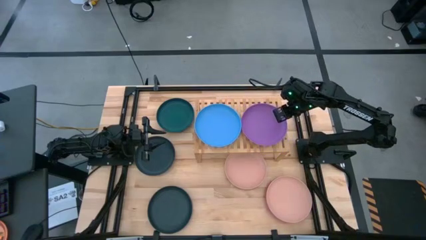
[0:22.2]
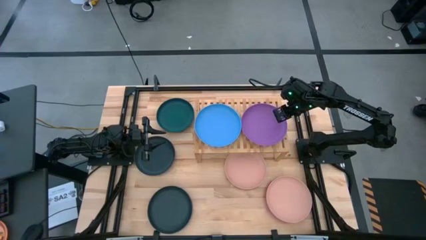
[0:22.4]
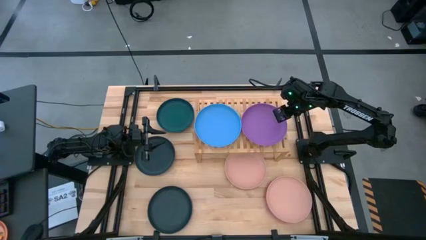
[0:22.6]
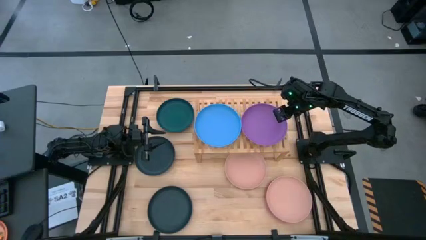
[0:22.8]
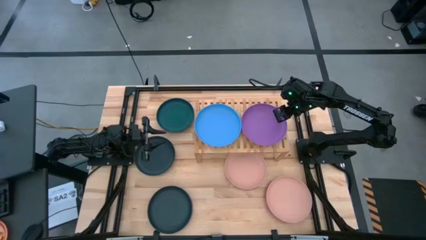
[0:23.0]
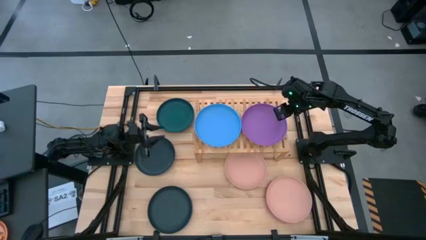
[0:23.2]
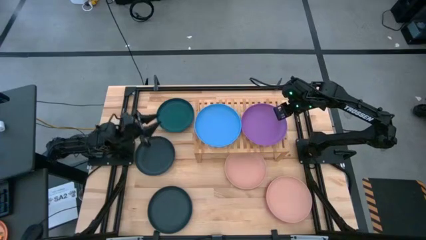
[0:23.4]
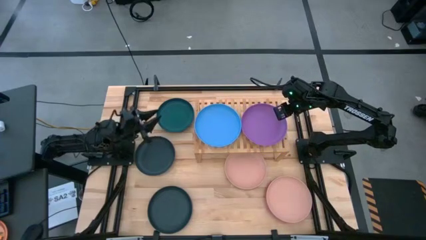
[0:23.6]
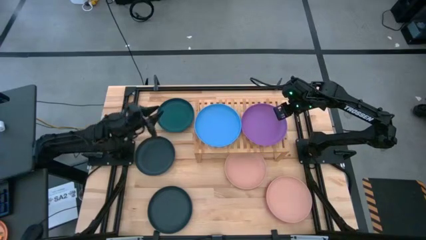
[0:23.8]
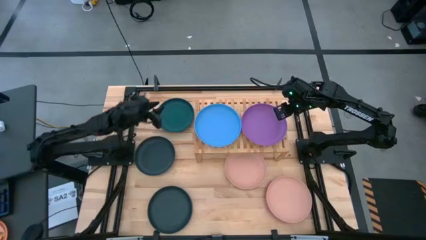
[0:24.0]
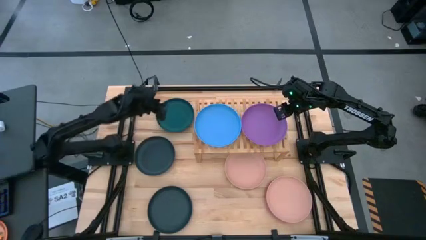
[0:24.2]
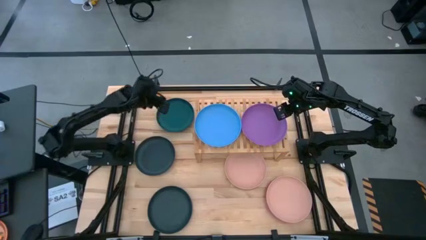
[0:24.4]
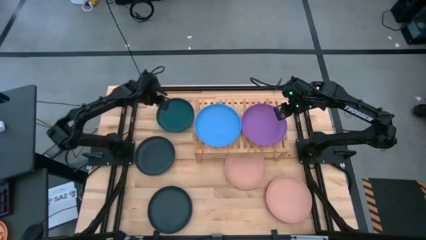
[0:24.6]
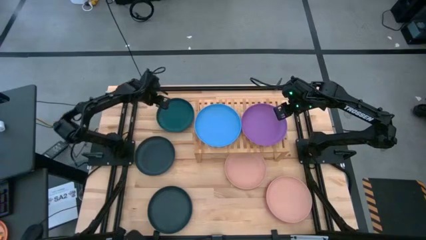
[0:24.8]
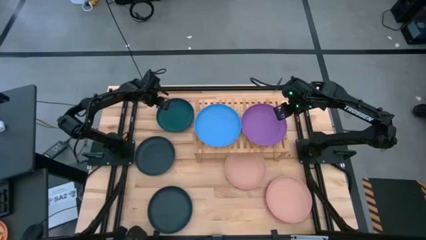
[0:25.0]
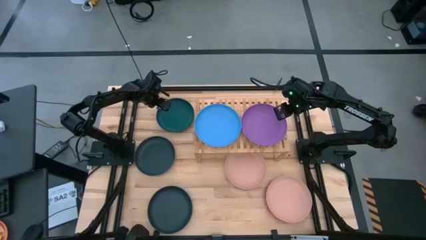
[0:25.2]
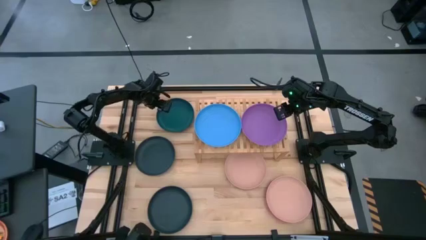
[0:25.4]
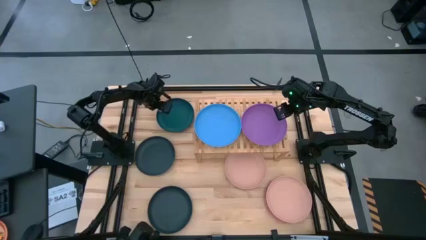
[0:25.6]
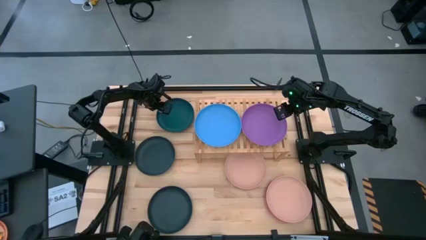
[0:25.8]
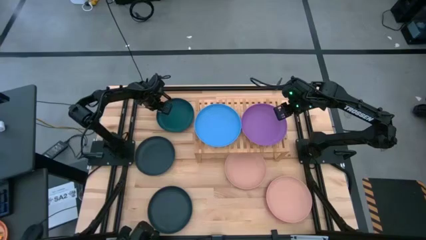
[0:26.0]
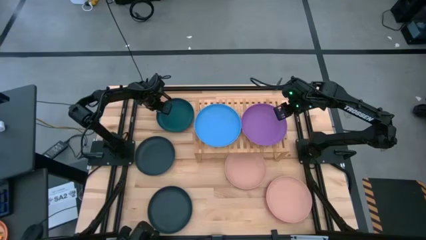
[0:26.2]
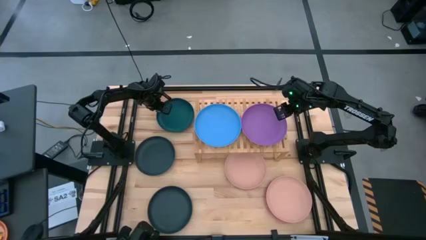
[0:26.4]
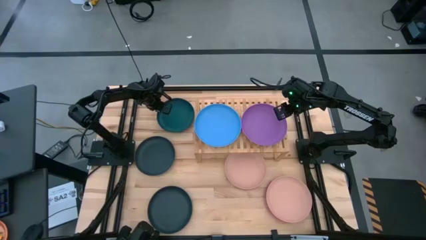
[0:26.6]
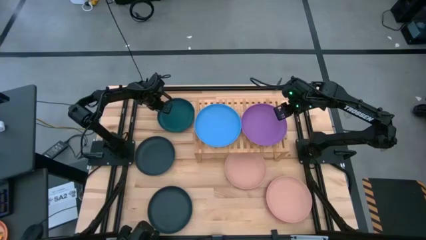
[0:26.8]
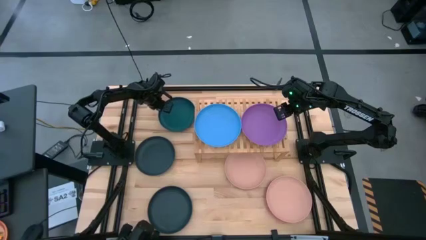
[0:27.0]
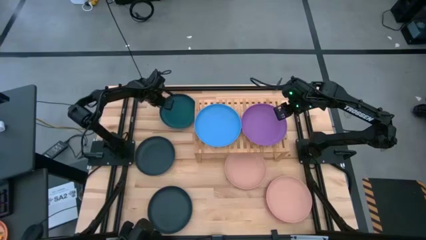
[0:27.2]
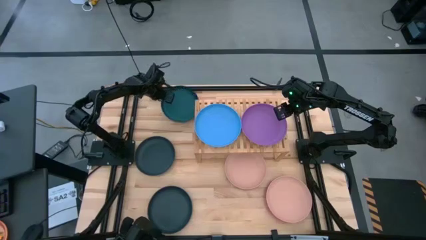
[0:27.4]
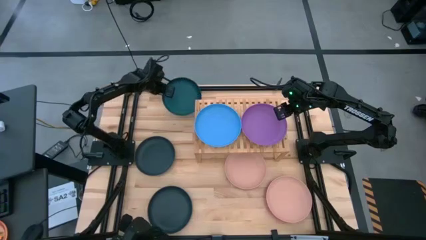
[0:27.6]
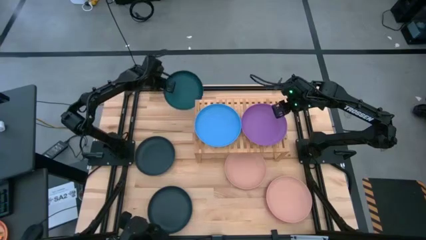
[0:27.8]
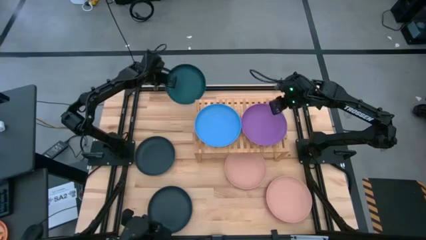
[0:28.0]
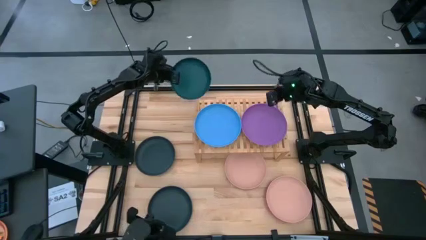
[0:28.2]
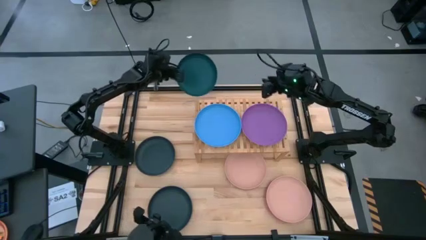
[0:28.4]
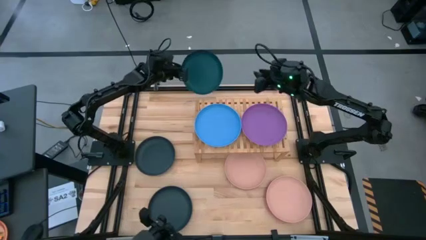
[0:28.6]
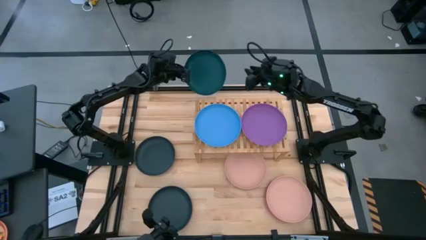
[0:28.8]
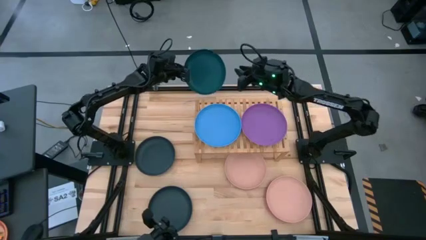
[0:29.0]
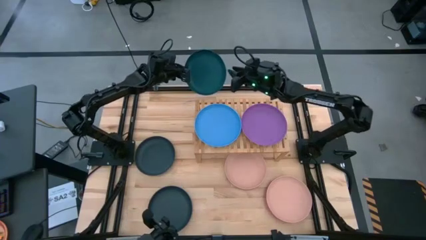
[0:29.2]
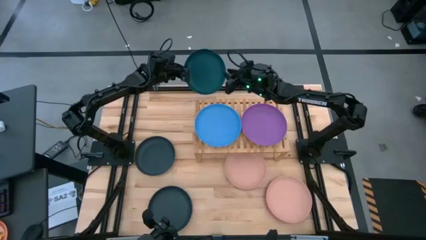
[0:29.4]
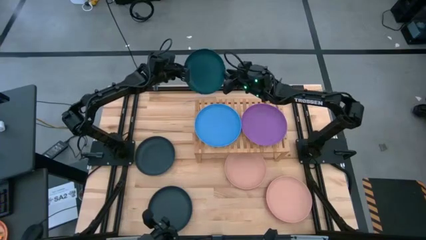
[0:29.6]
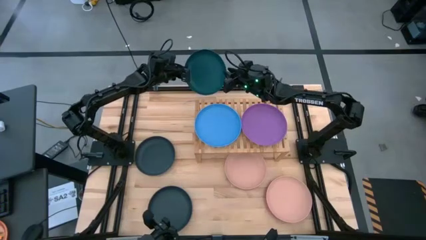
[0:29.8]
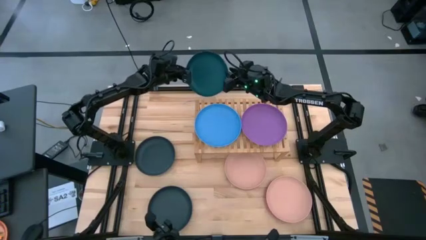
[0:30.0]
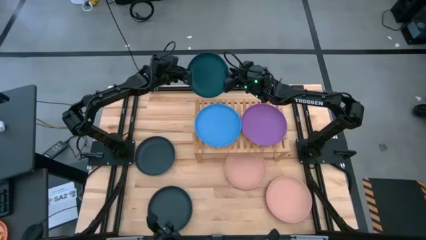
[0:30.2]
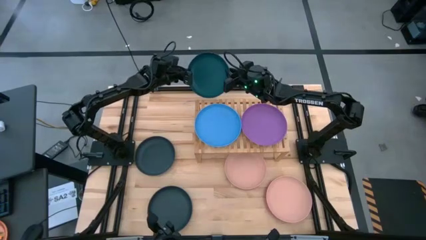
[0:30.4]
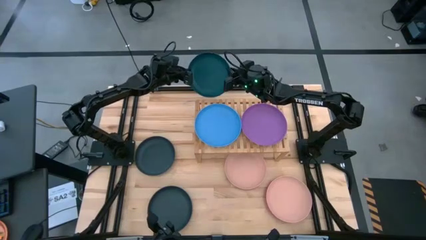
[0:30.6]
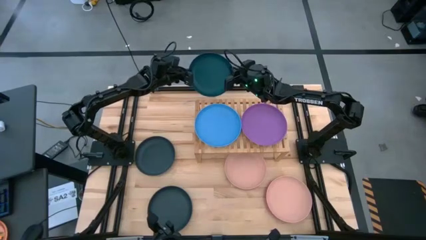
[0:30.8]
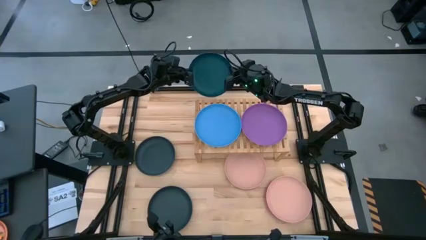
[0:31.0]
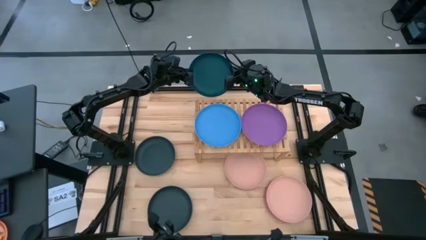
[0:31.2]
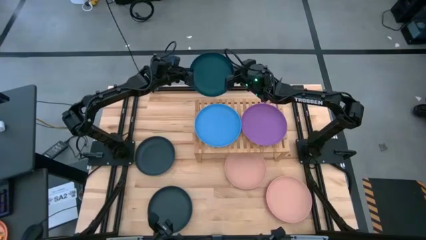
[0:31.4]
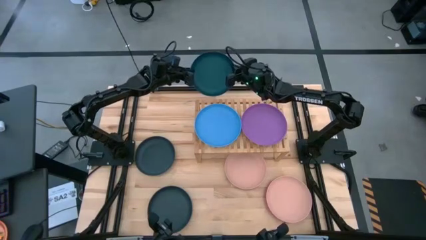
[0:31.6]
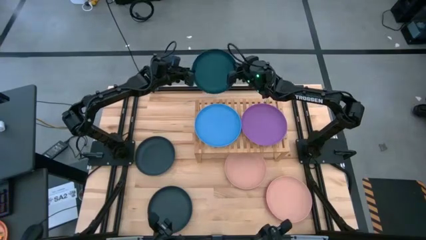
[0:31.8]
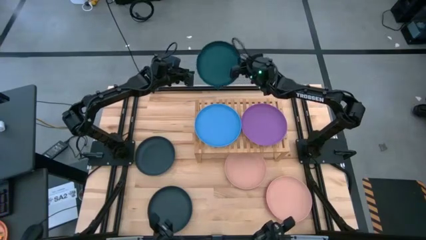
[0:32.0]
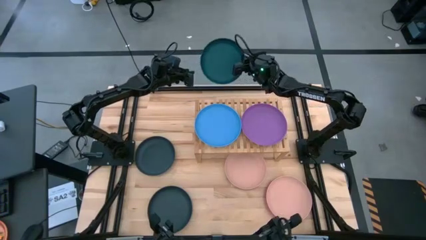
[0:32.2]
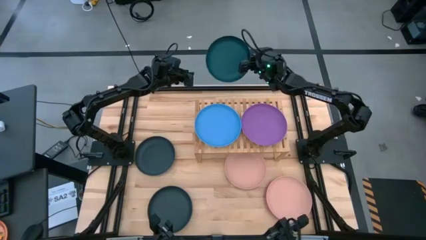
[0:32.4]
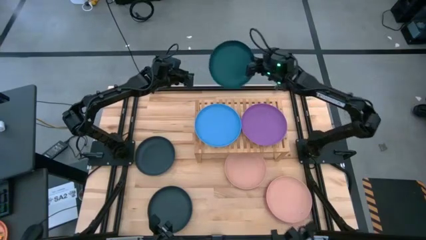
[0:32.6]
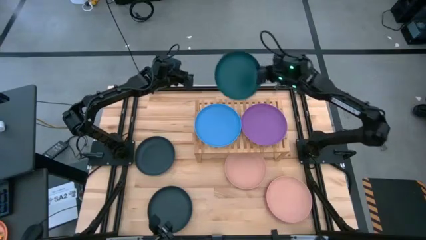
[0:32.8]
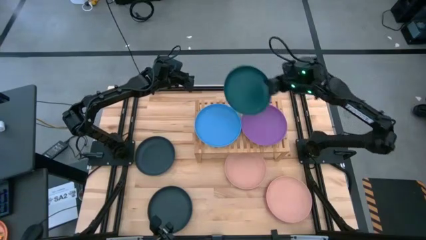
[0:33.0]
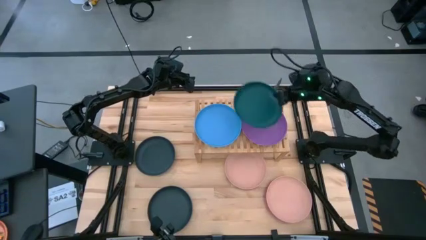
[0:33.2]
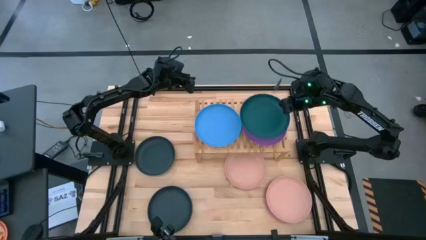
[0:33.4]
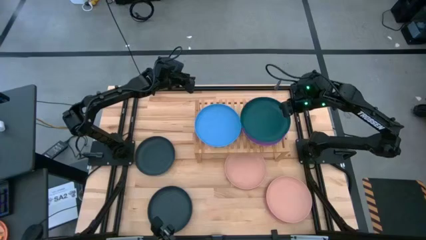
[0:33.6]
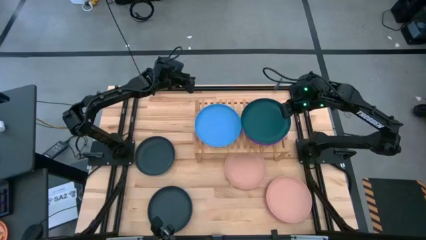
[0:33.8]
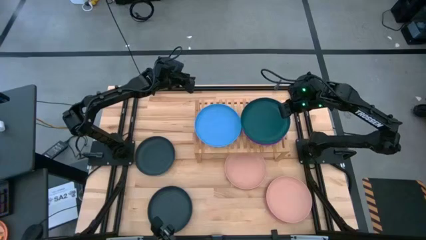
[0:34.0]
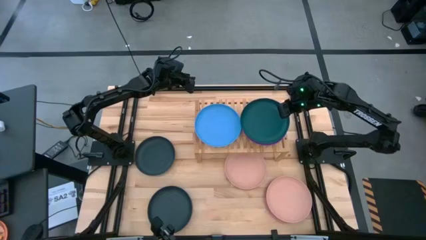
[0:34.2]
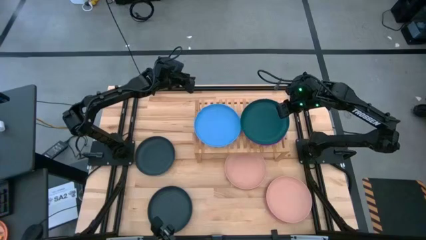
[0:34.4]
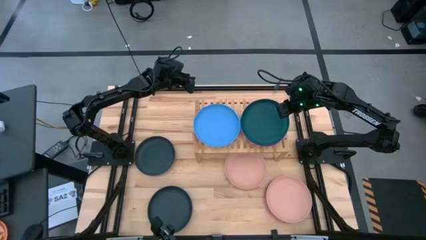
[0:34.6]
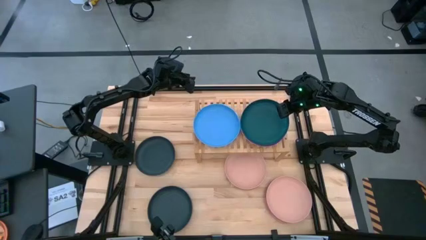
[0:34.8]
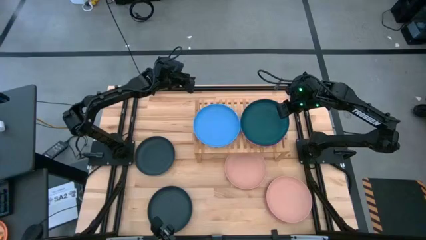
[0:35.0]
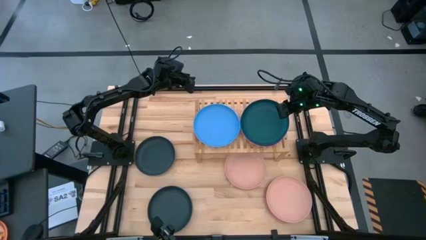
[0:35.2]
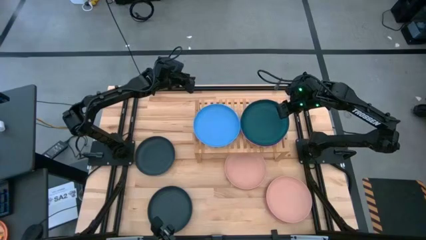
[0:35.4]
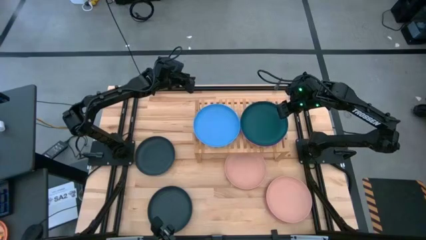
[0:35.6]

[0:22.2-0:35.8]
Task: Place and stack plates onto a shelf
Stack the green plate on top of the purple plate on the shelf
